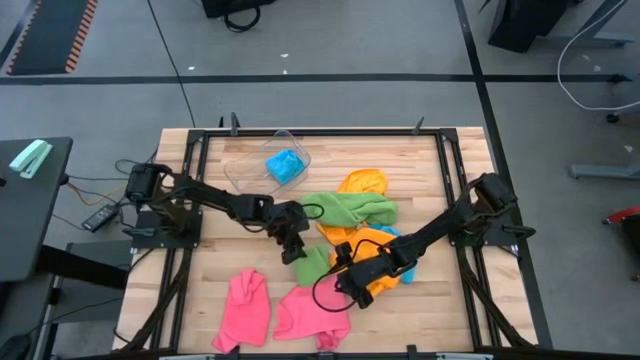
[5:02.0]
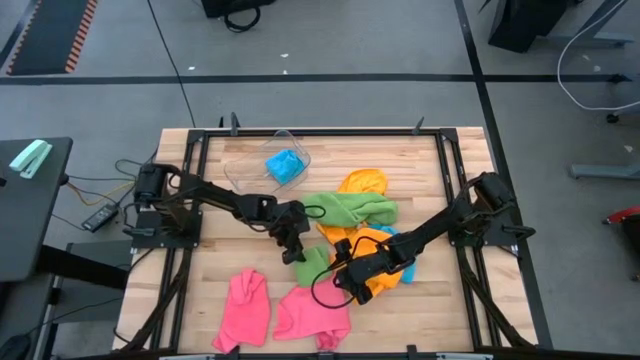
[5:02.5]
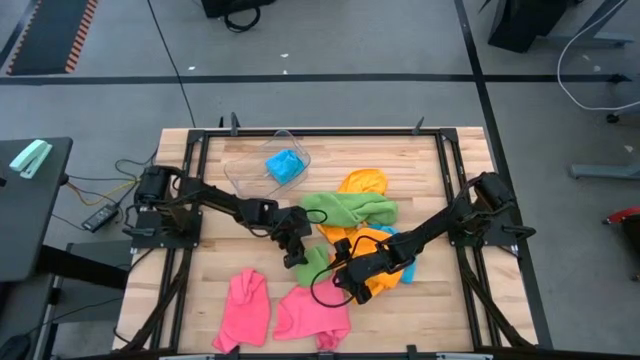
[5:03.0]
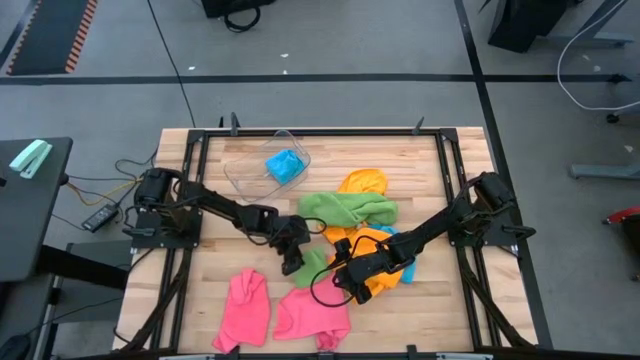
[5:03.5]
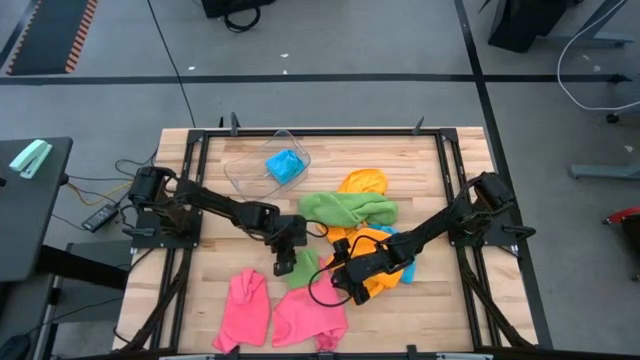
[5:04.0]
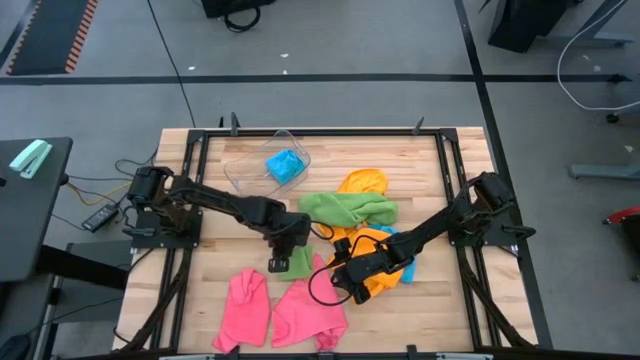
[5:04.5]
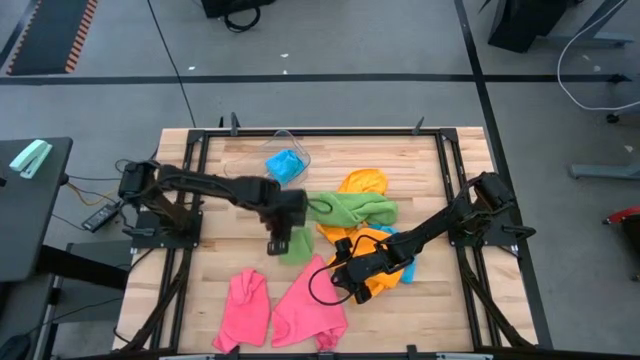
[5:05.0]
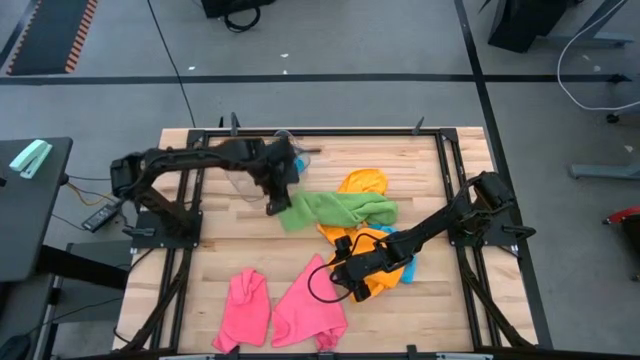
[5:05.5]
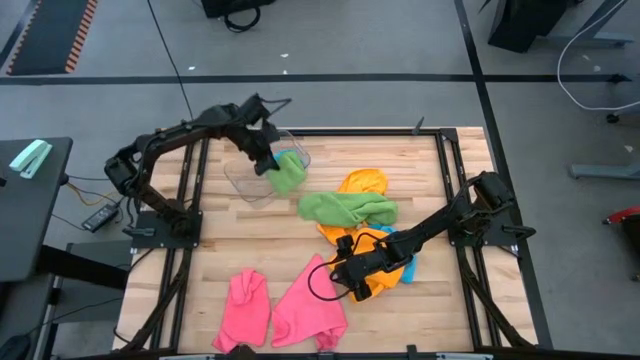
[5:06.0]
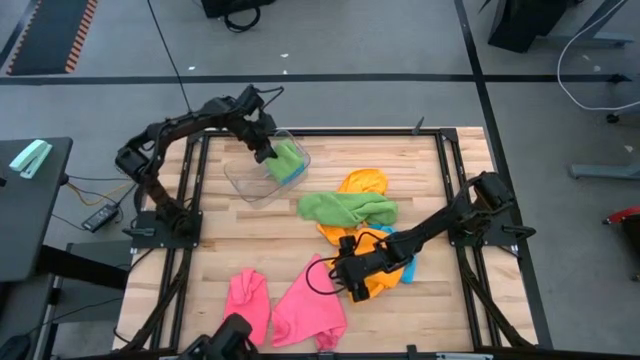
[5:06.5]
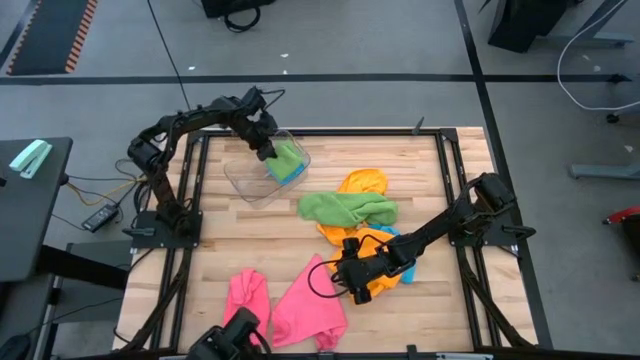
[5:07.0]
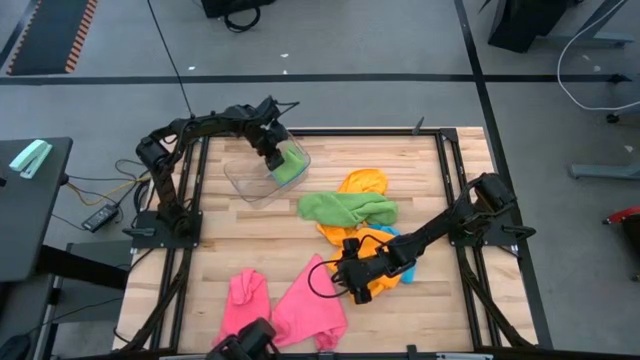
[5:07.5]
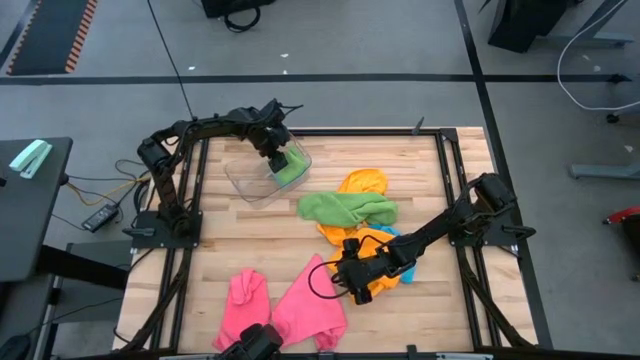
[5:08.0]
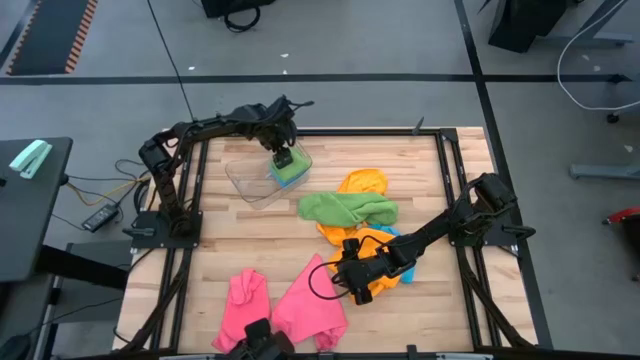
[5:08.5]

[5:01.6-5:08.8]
Task: Fold microfiber towels
Put the left green microfiber towel into the transparent bin

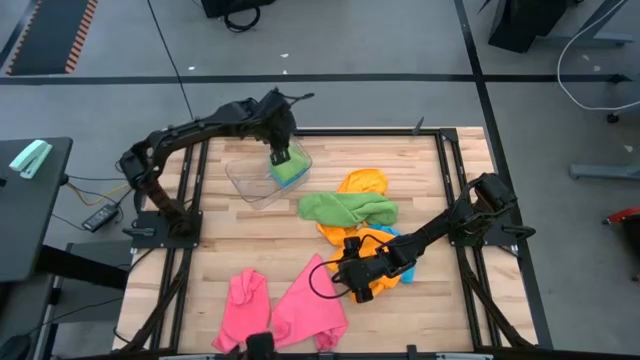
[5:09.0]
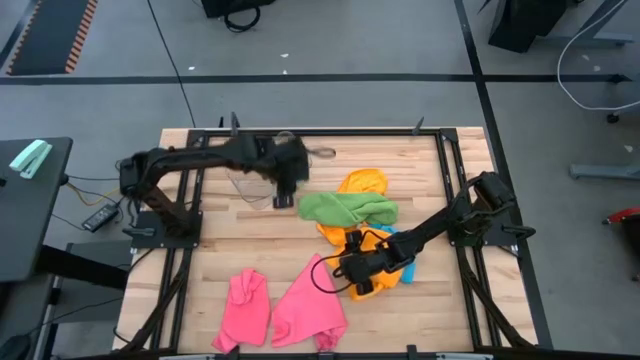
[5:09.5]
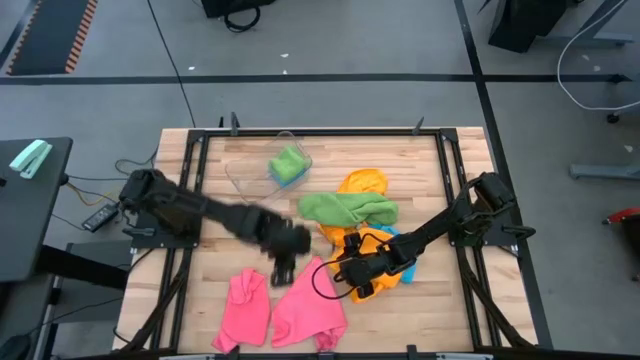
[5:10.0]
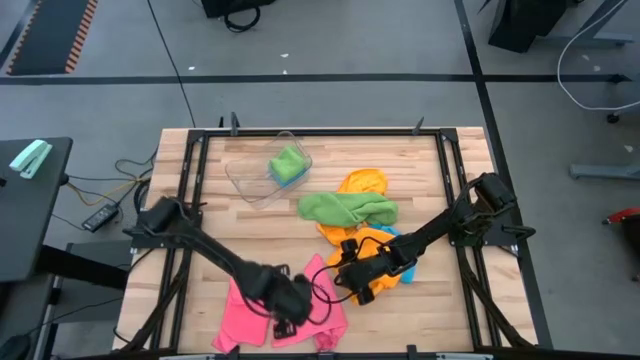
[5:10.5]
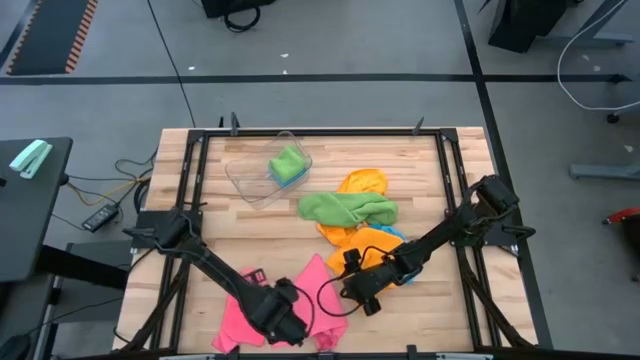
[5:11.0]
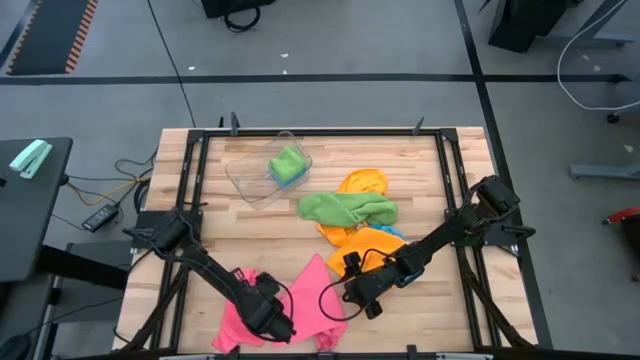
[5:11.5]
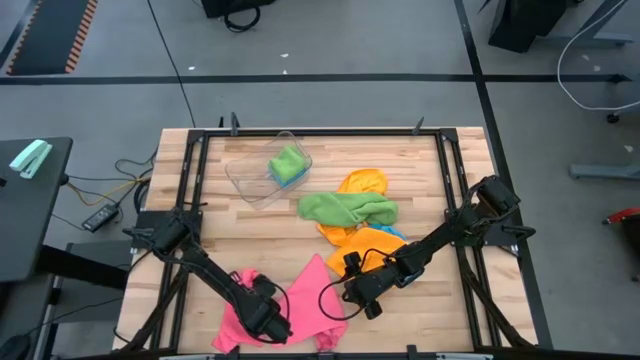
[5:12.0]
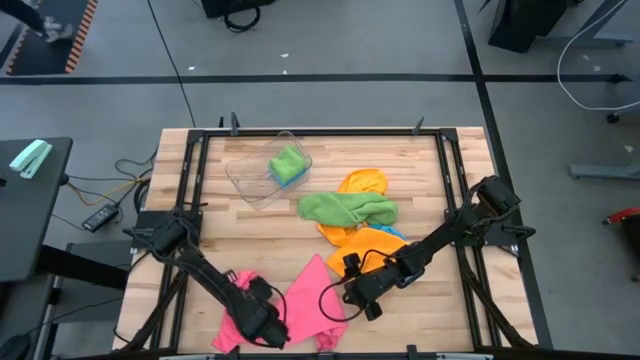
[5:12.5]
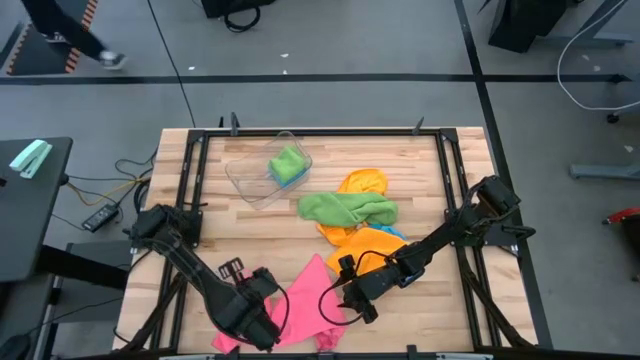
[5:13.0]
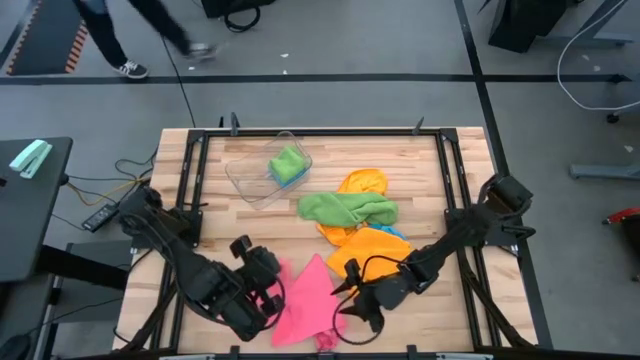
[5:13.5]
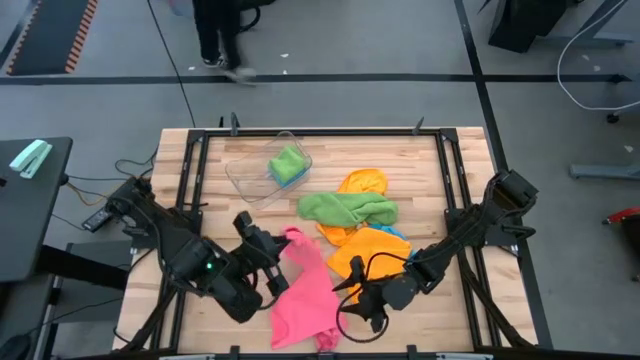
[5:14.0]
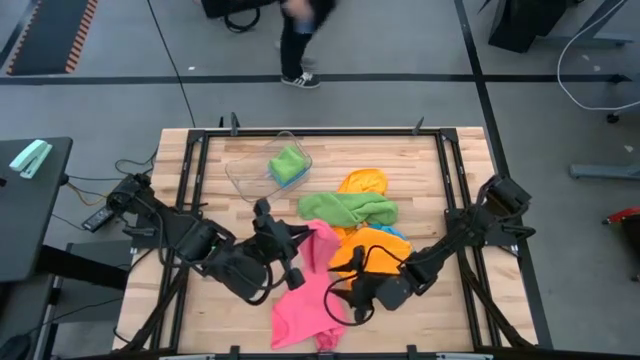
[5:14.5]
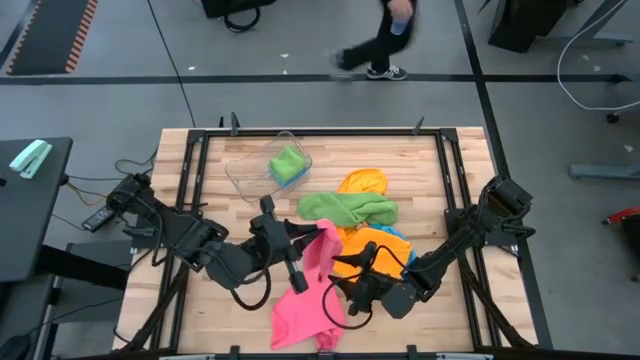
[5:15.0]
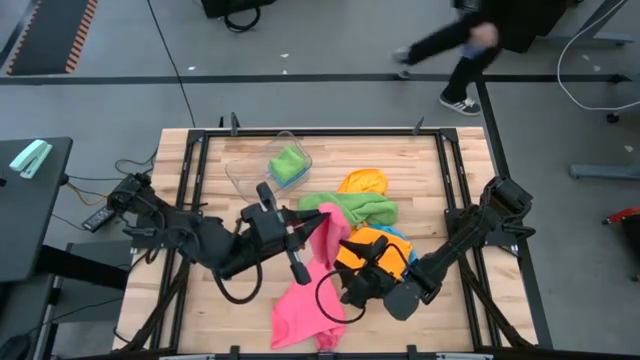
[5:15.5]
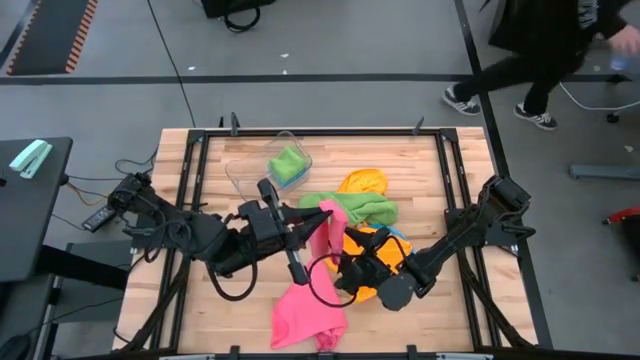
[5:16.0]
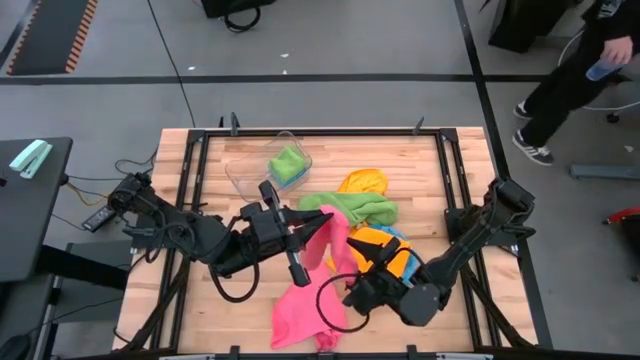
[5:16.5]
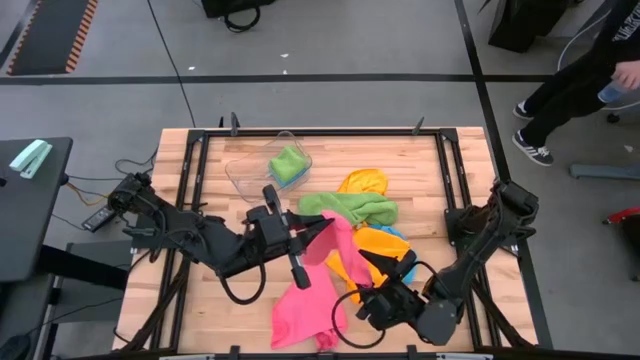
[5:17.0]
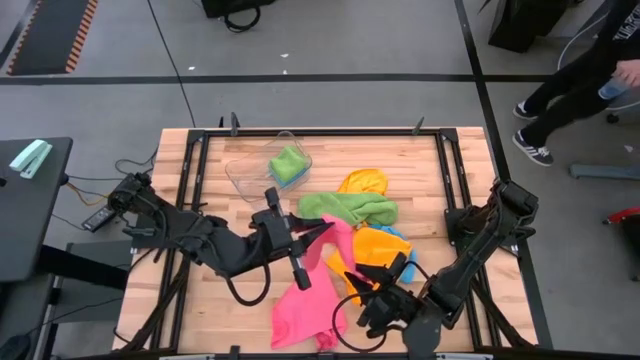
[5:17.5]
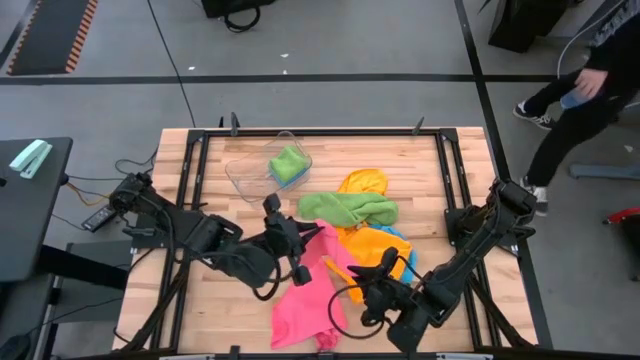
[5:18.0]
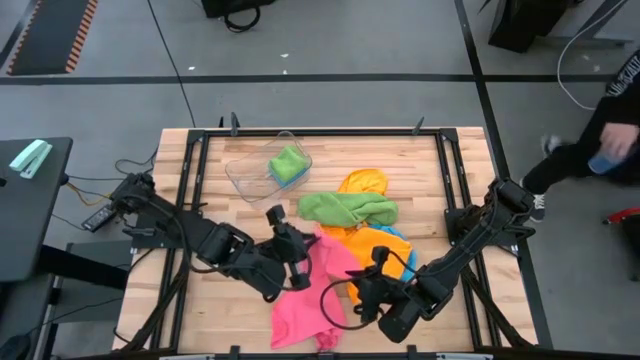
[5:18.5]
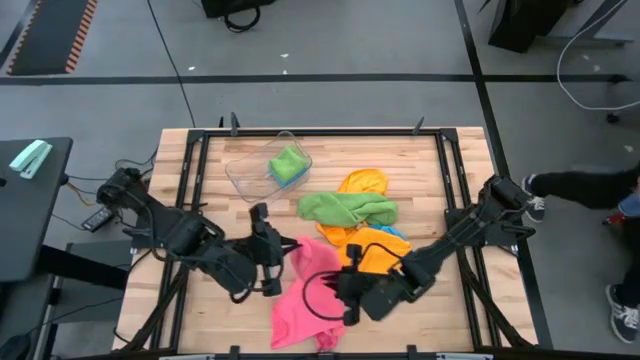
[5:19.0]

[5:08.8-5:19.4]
Fold the left pink microfiber towel

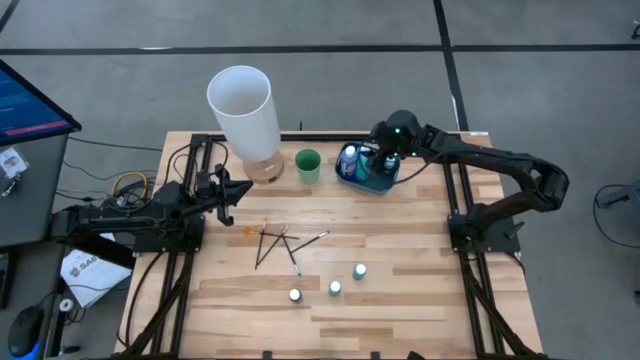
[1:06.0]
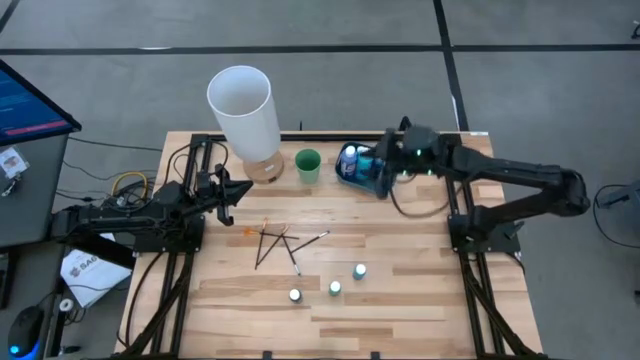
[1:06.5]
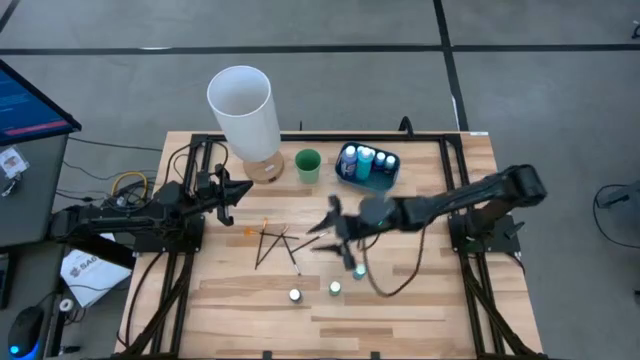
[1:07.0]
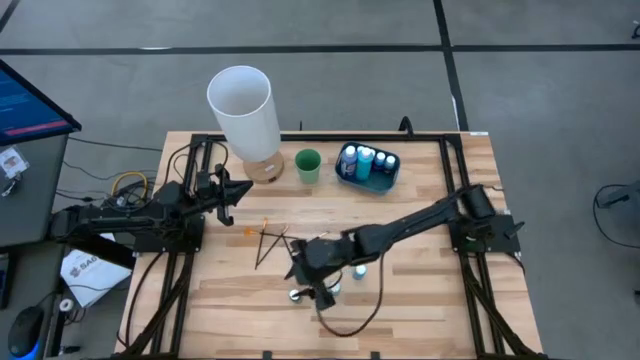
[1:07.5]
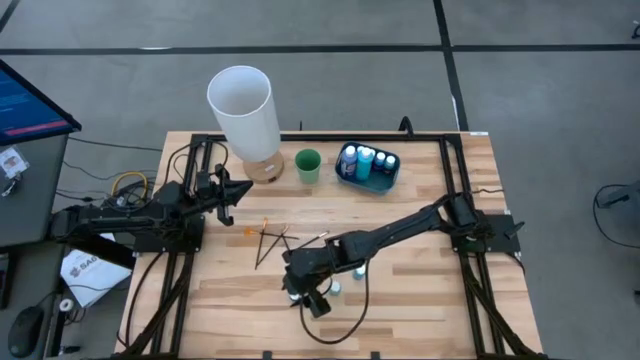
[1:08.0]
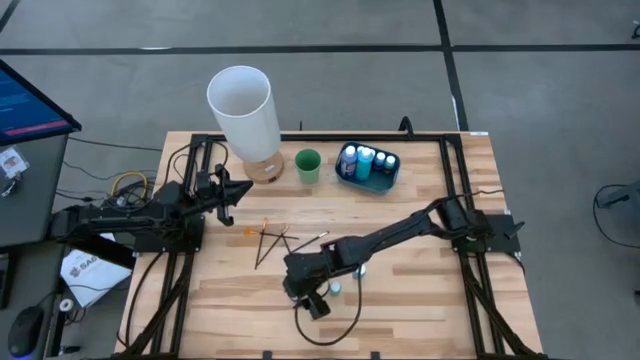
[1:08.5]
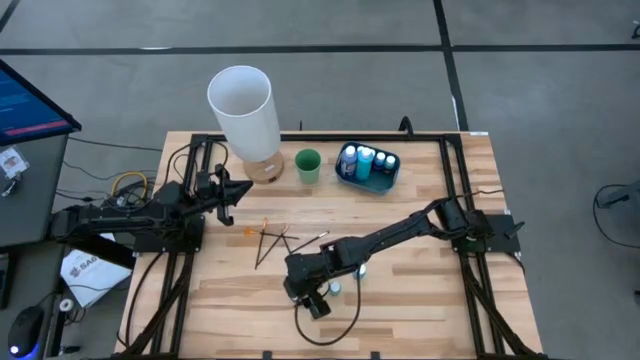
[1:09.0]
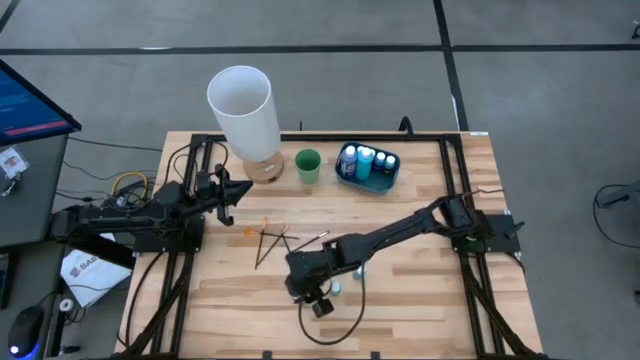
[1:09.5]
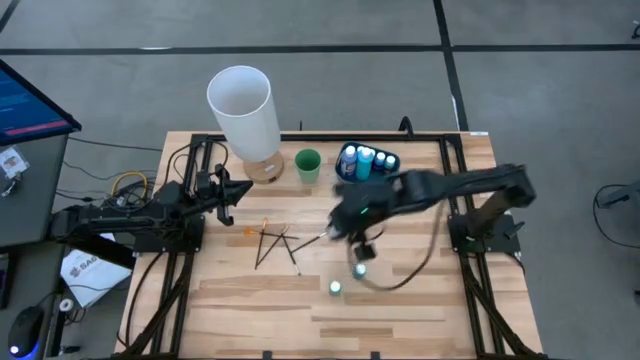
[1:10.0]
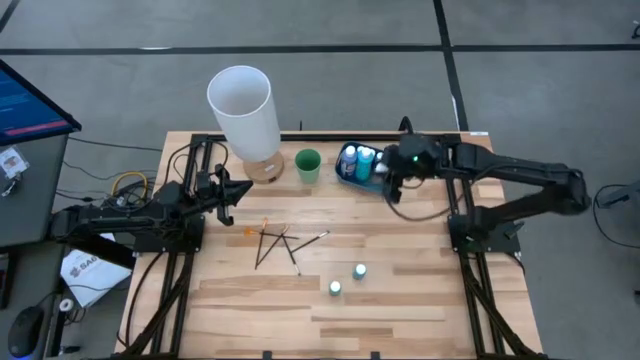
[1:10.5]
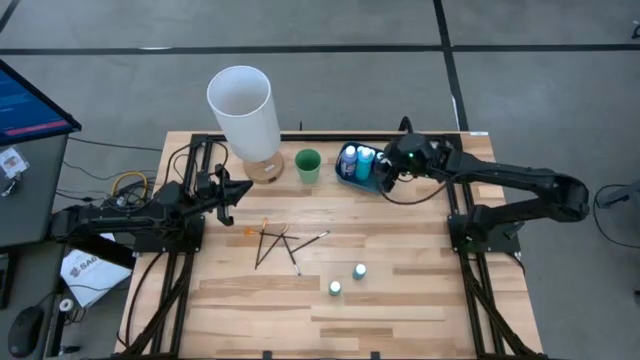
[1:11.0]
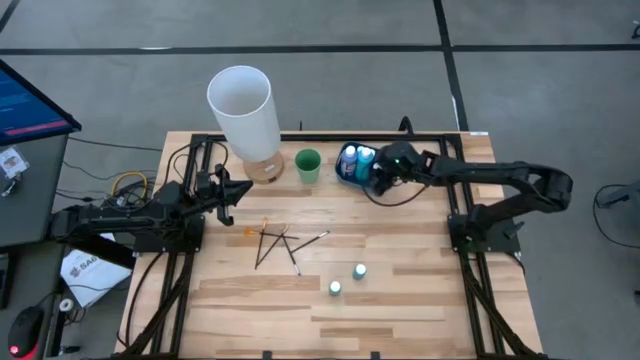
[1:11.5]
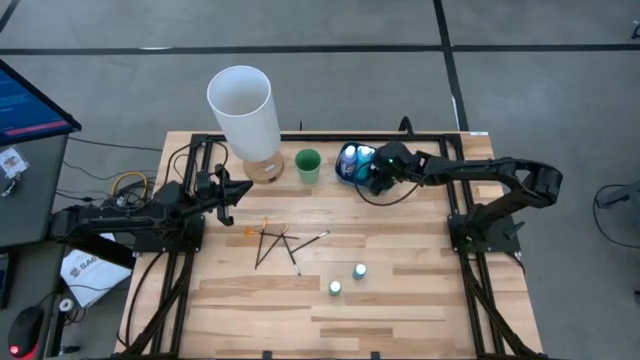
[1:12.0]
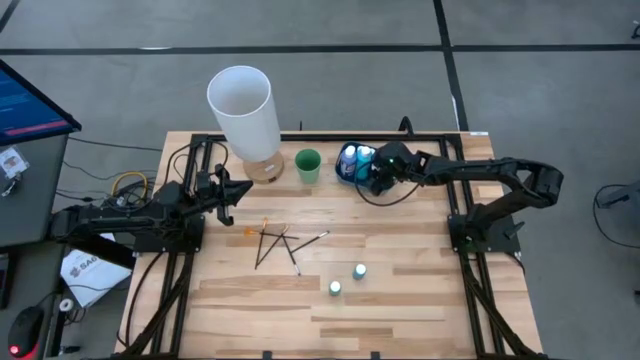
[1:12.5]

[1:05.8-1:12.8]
Task: Pick & Place Paint Supplies
Put the black paint bottle into the blue bin
